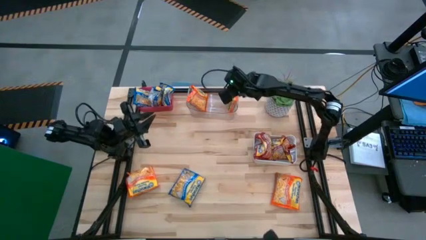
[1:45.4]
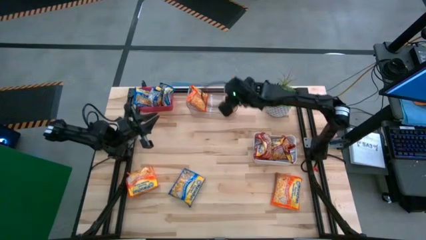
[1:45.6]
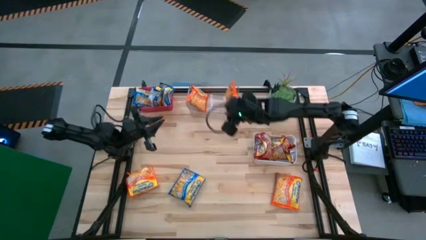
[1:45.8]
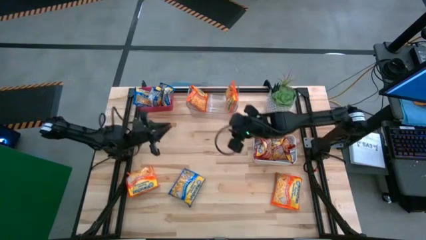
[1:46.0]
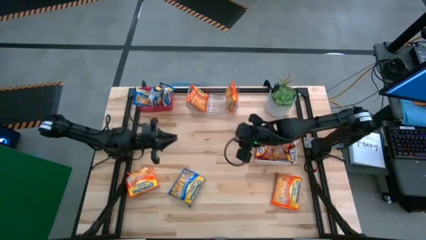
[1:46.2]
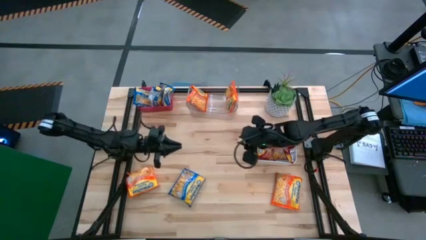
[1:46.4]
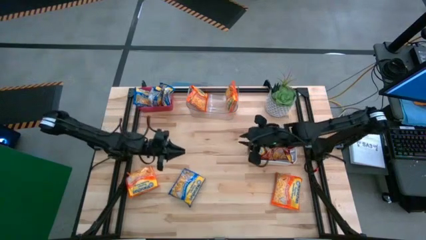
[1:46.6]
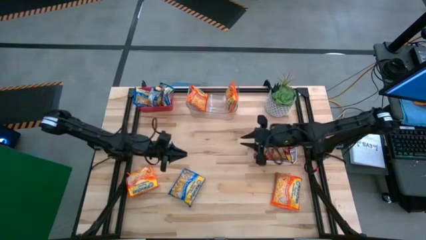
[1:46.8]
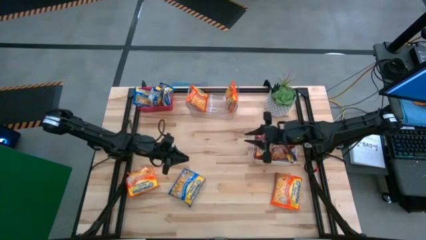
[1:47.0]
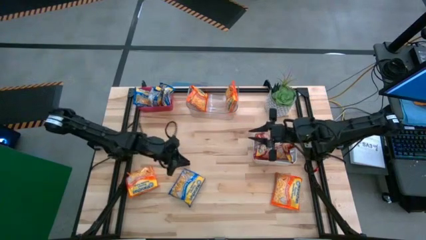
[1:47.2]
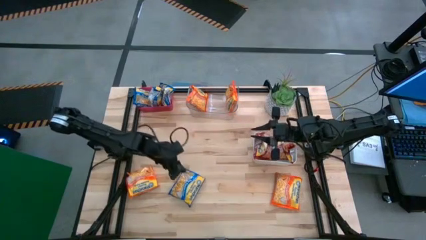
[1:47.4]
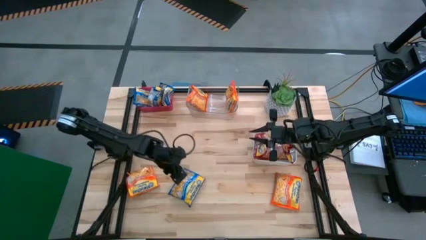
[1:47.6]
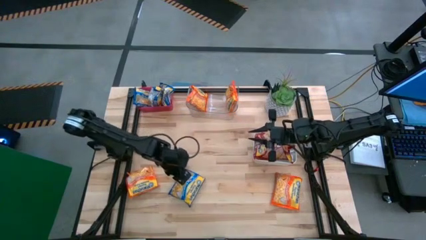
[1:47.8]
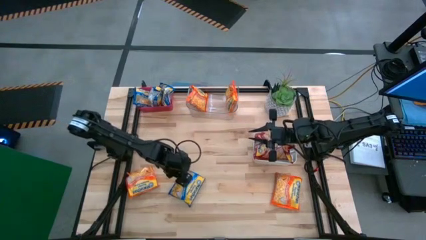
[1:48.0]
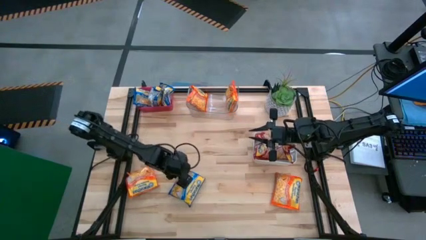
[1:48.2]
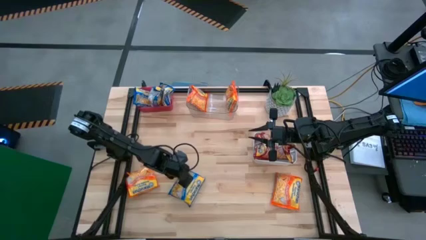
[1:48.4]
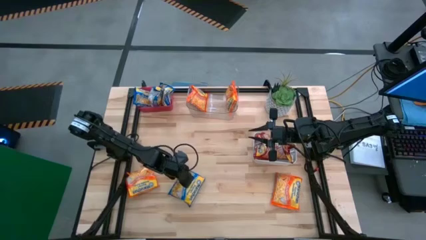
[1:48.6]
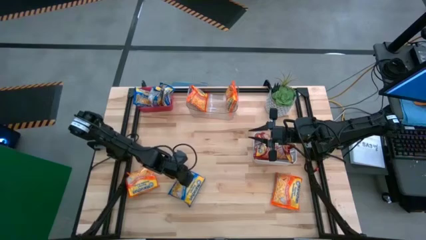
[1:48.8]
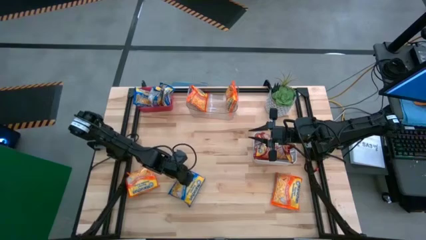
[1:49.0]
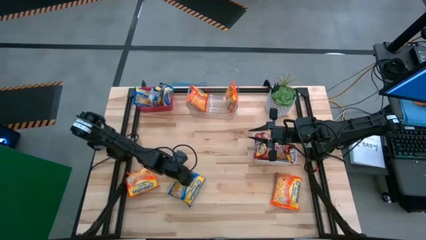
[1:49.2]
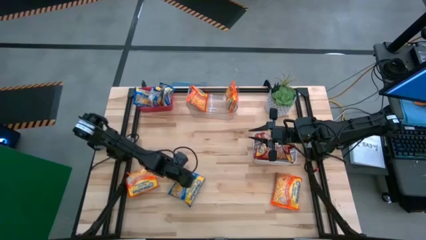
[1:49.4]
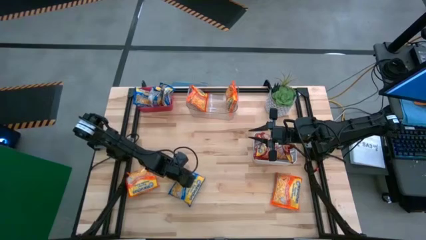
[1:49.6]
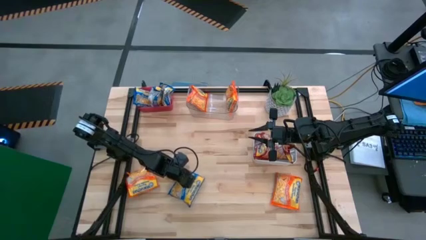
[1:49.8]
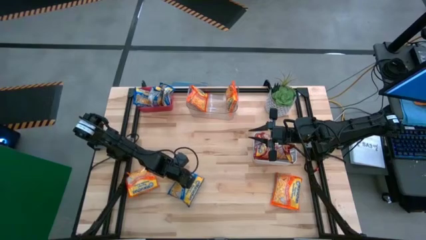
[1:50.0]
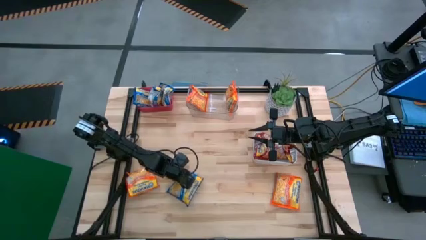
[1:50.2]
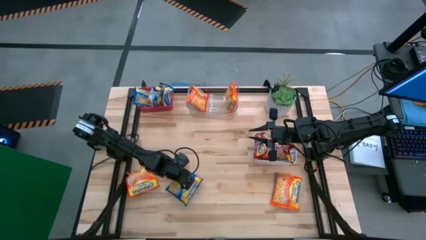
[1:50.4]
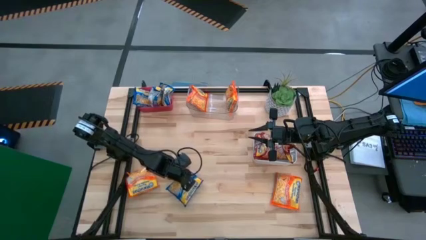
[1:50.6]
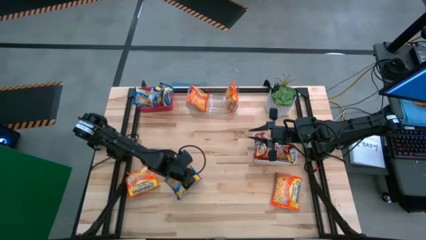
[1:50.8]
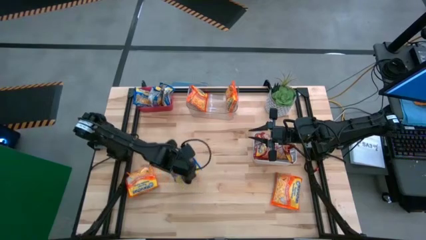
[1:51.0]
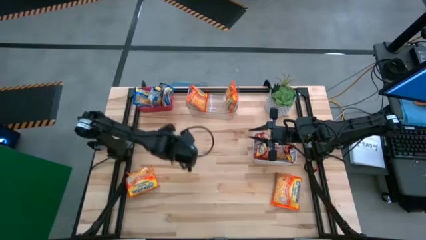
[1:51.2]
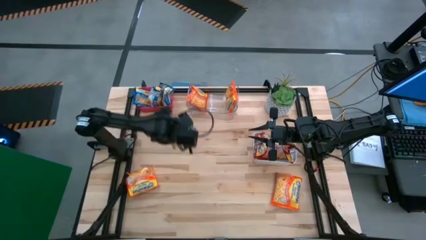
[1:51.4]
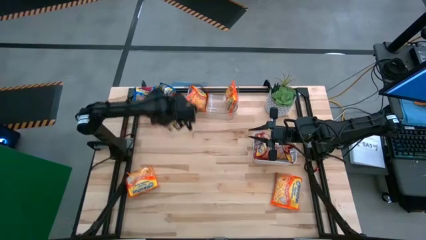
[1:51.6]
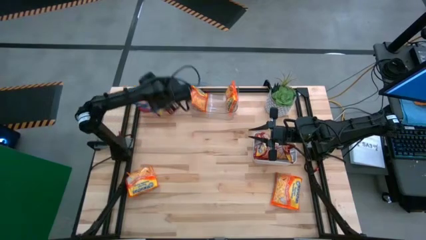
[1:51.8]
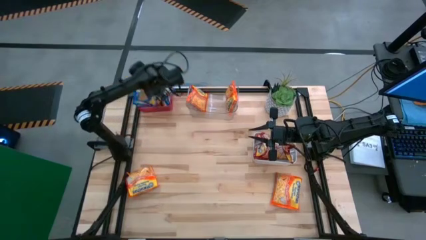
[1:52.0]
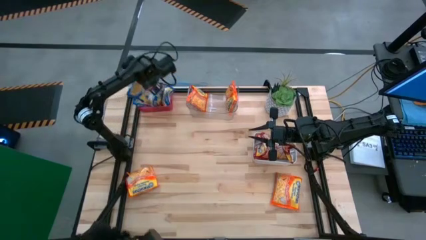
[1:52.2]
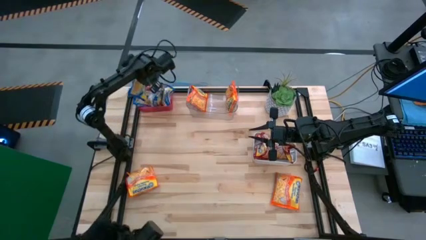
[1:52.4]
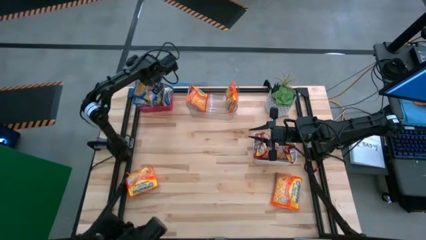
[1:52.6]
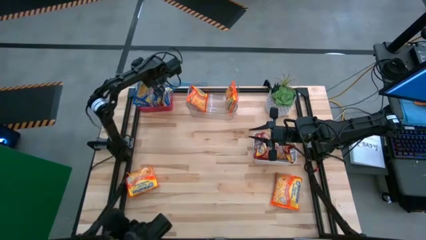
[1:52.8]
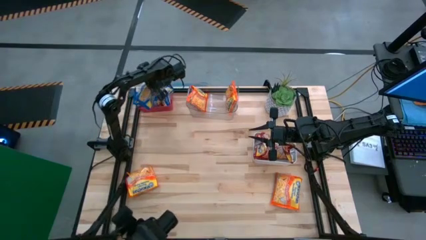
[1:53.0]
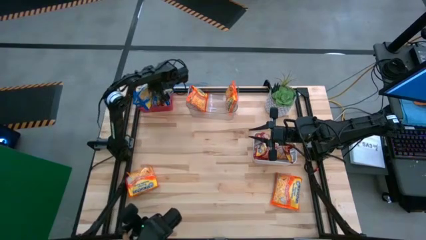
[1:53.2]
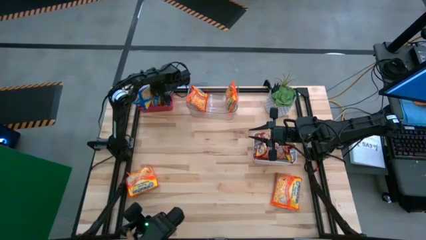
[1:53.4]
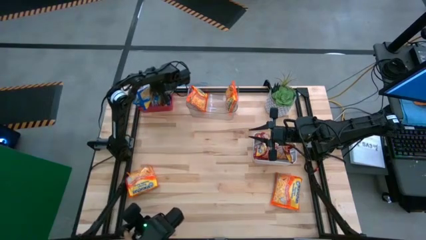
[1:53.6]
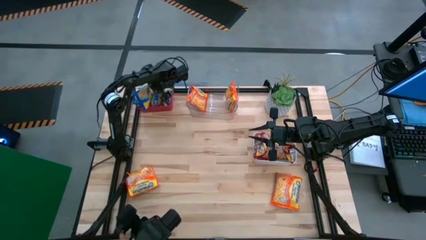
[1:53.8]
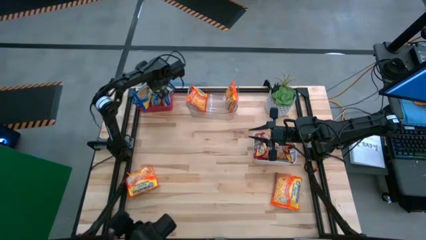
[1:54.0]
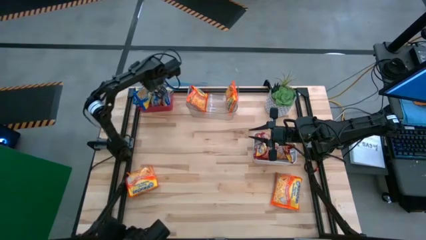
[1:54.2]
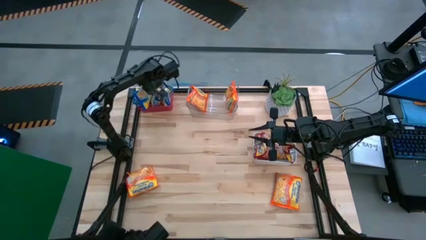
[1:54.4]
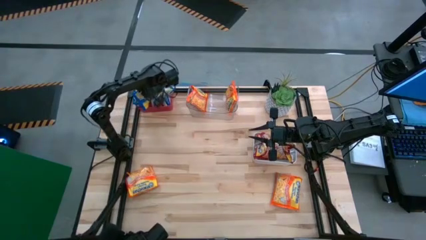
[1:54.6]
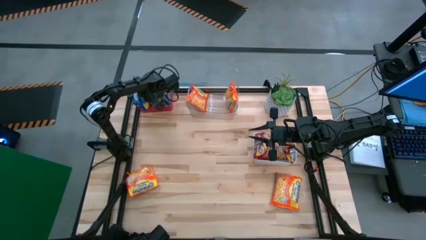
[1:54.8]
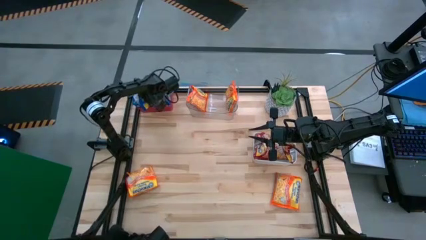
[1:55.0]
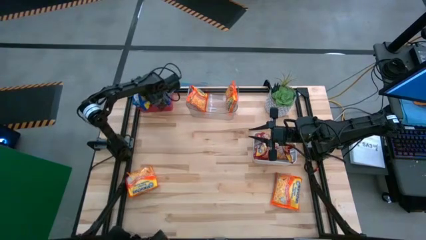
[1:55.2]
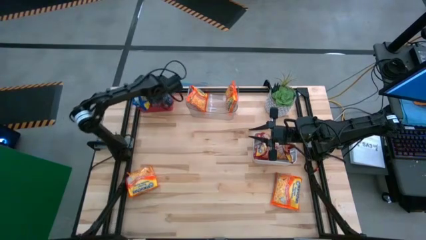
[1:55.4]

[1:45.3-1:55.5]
Task: Sort Maruchan noodles
Put the blue noodle pack into the red bin
